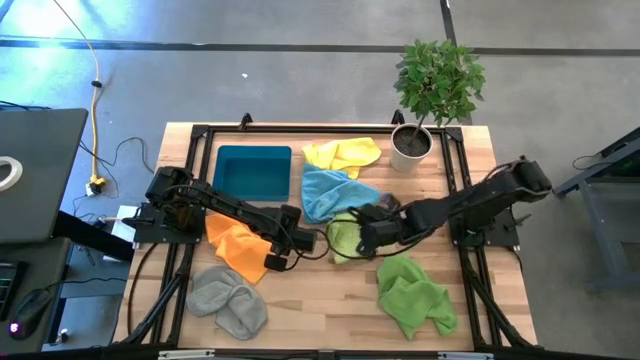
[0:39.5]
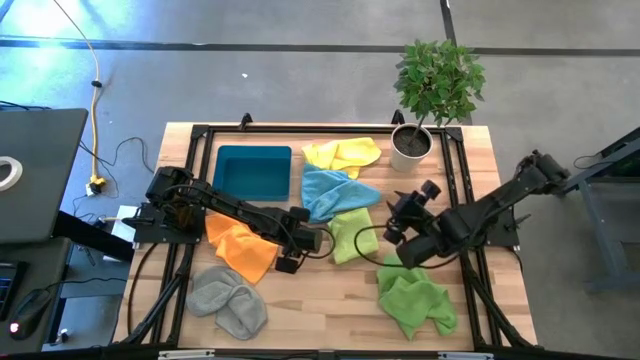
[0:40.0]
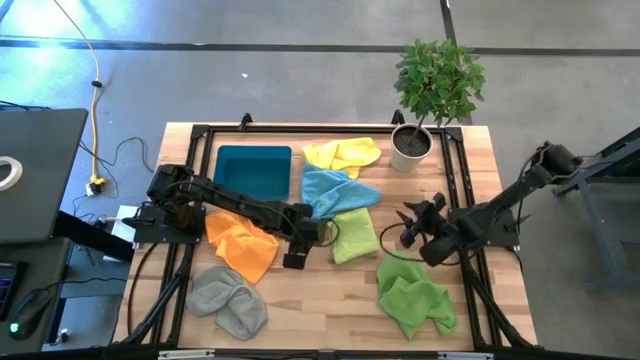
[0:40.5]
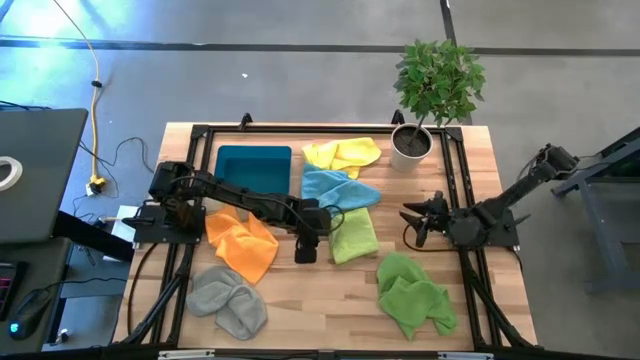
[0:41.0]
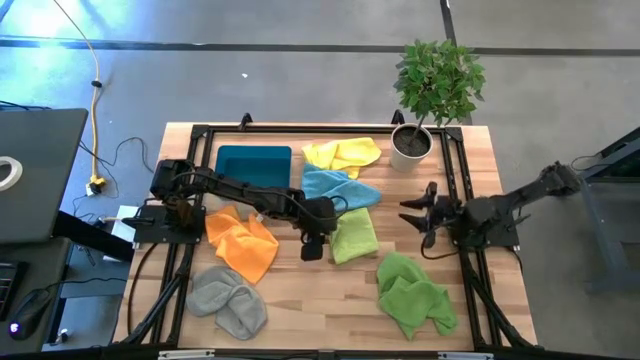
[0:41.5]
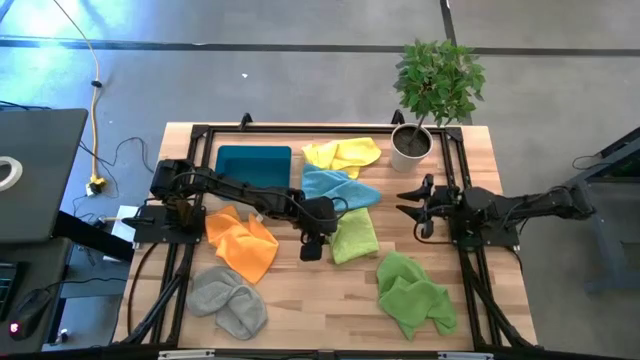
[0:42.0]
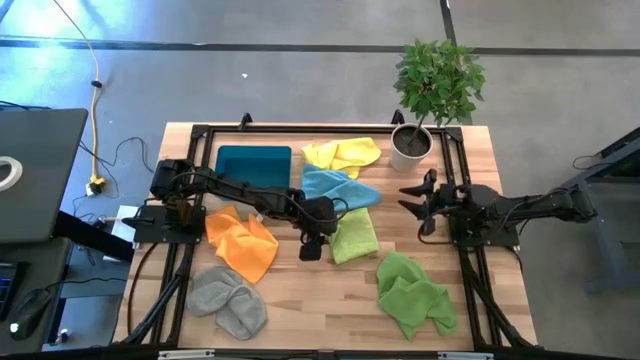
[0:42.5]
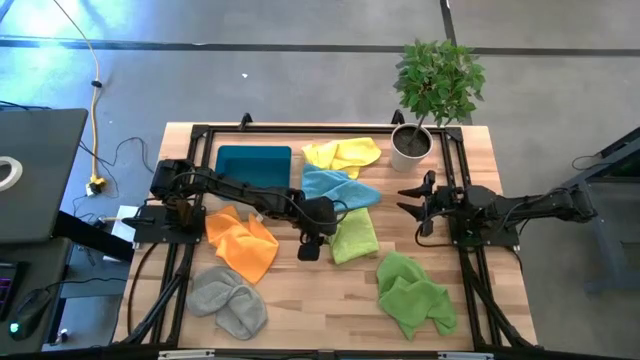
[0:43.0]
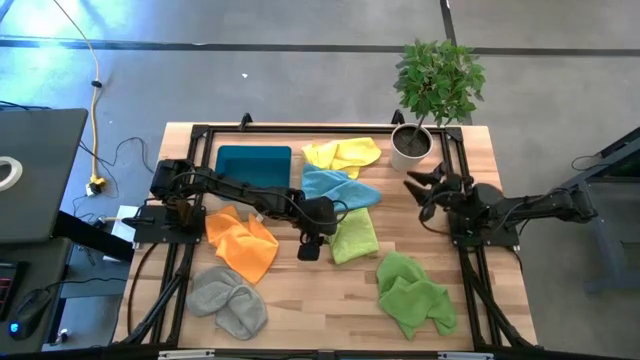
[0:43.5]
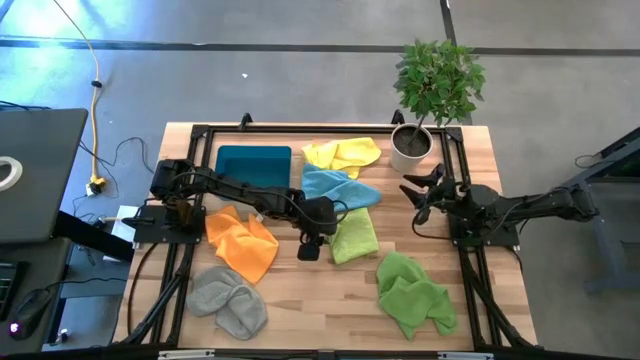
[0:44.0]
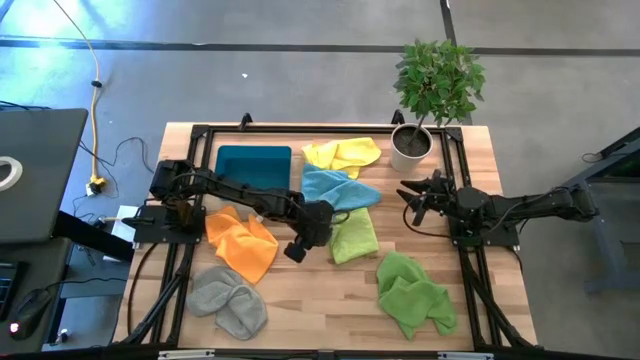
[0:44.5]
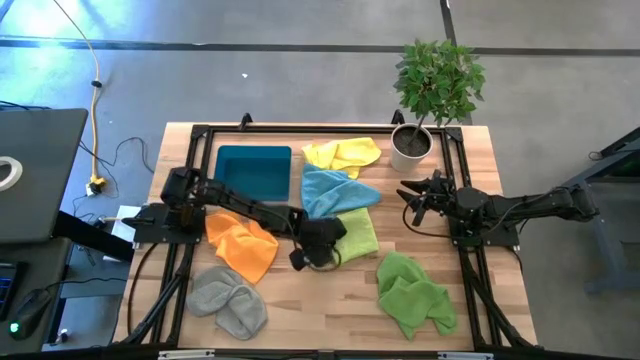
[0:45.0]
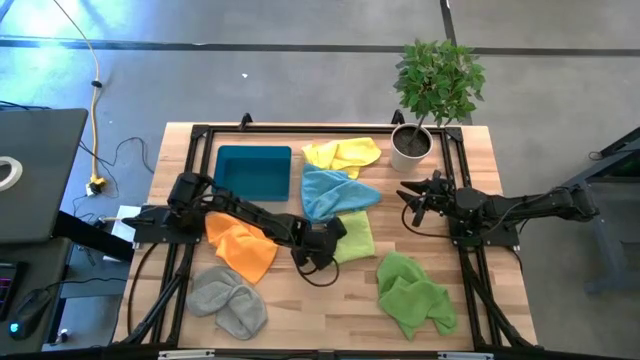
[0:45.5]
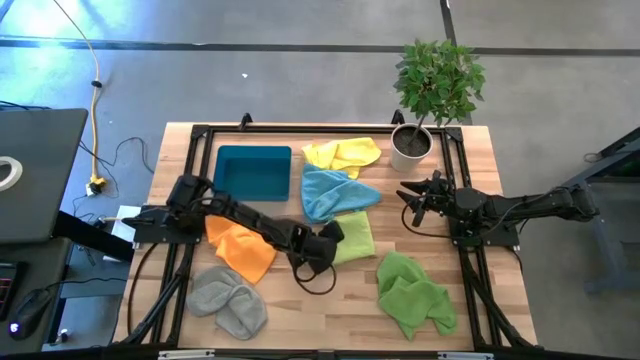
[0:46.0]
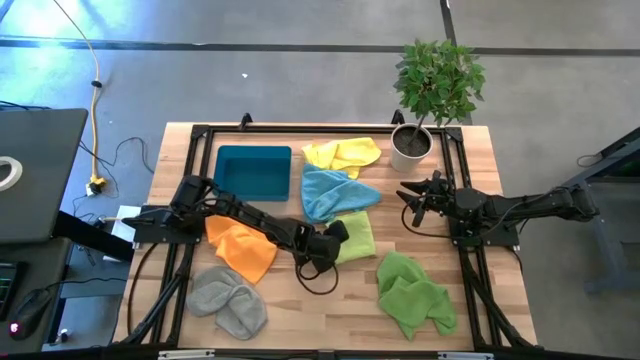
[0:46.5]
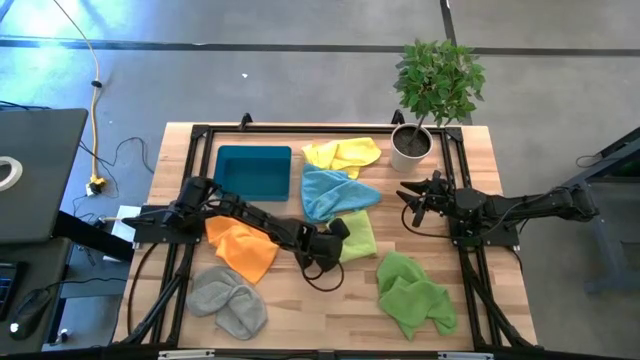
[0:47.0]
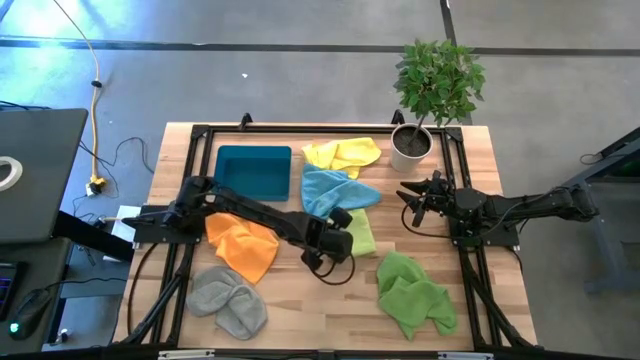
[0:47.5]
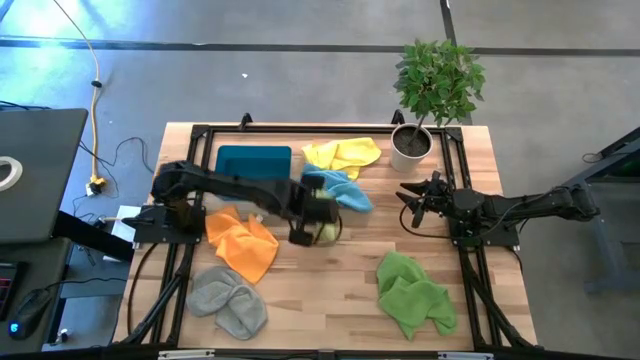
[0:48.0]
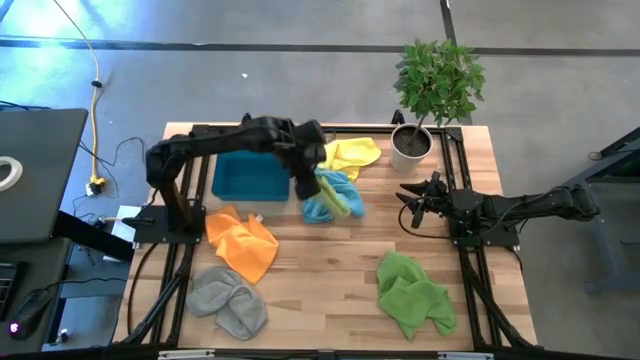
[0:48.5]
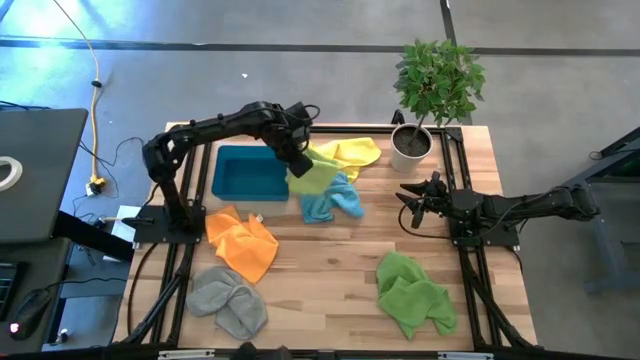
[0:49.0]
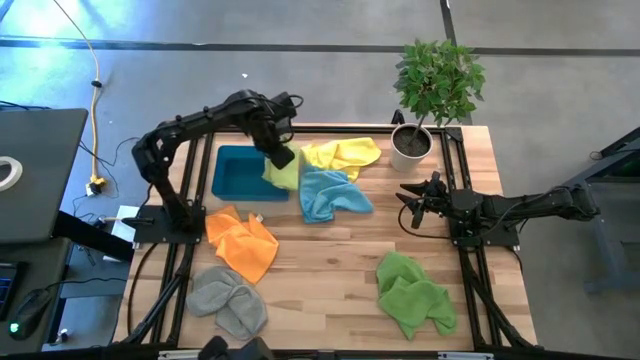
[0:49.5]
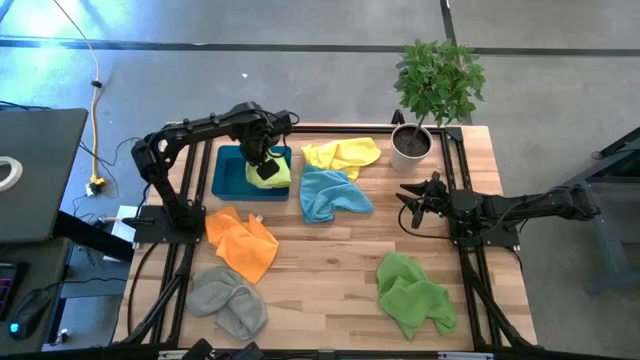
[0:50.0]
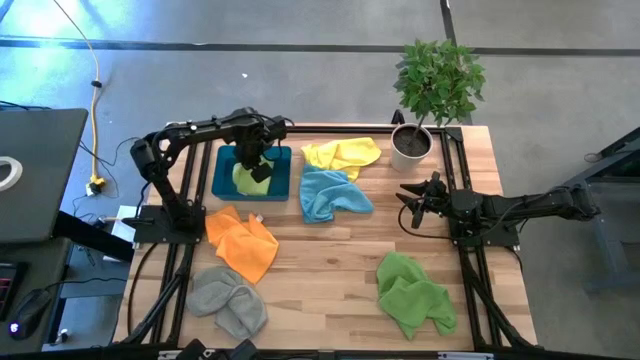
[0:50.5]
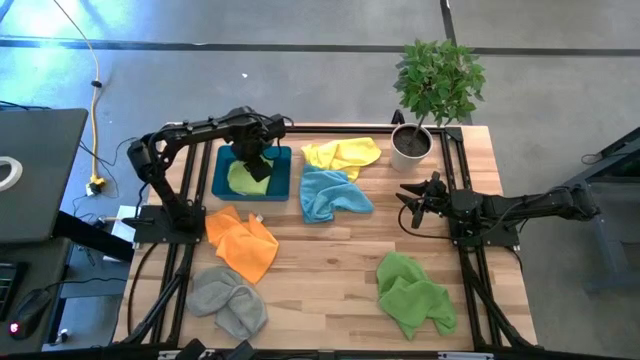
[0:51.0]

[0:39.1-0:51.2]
Task: Fold microfiber towels
Put the folded light green microfiber cloth into the blue bin

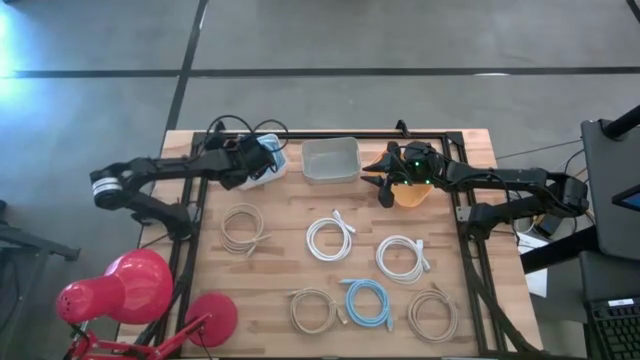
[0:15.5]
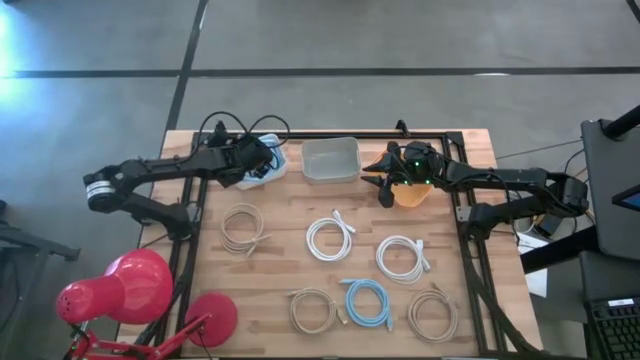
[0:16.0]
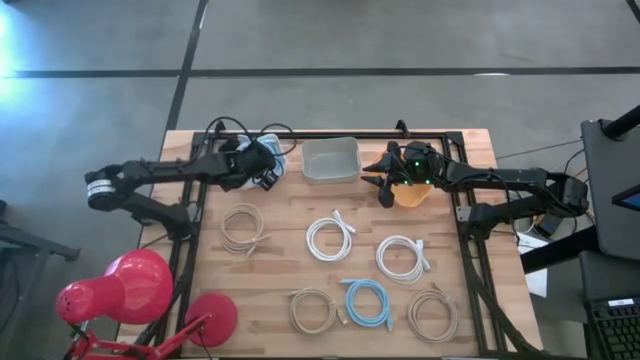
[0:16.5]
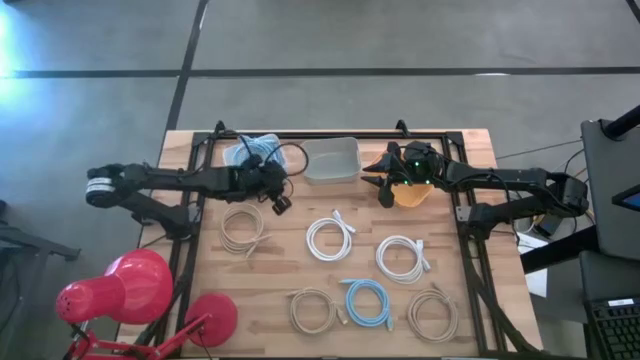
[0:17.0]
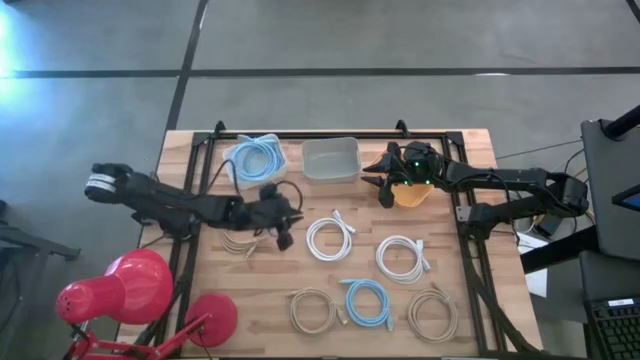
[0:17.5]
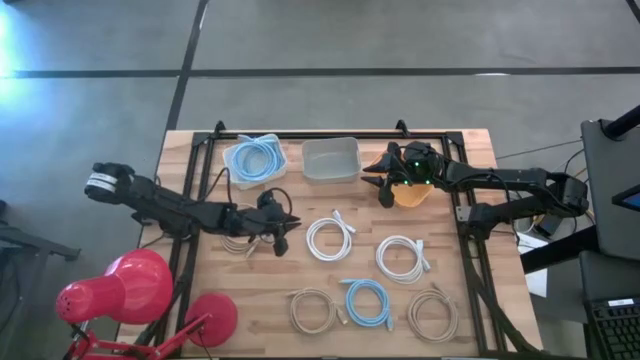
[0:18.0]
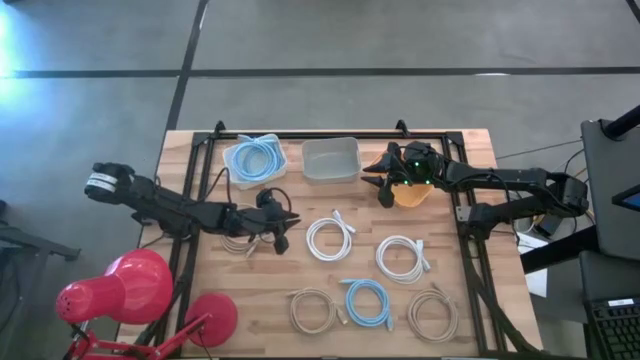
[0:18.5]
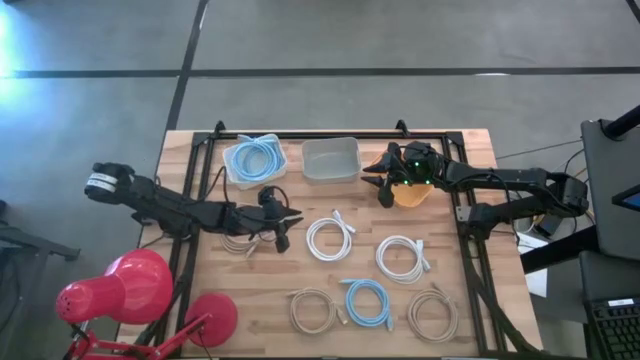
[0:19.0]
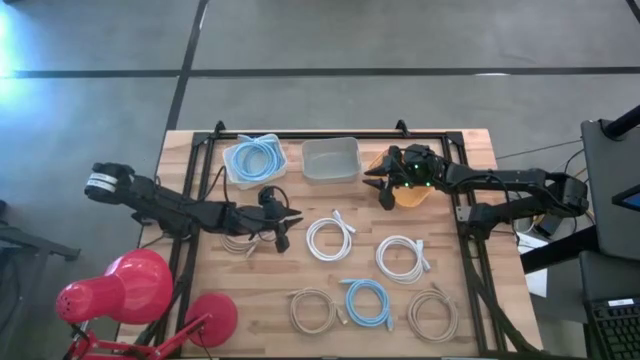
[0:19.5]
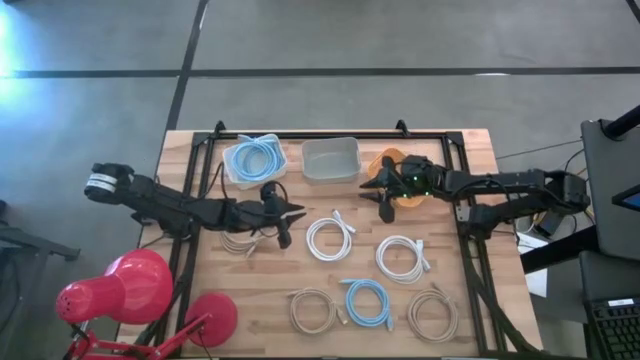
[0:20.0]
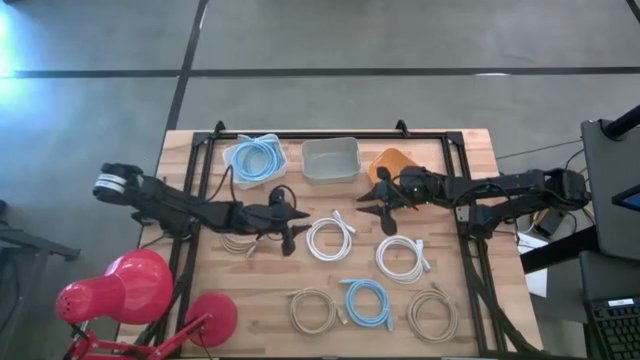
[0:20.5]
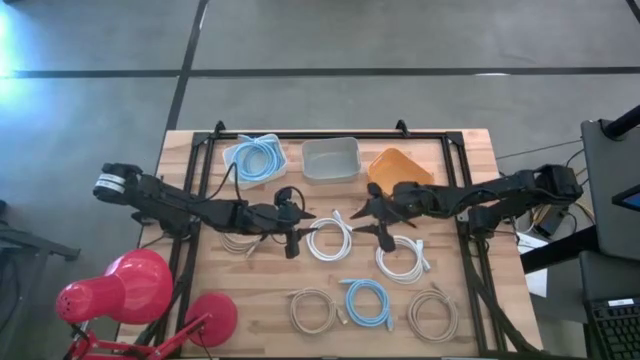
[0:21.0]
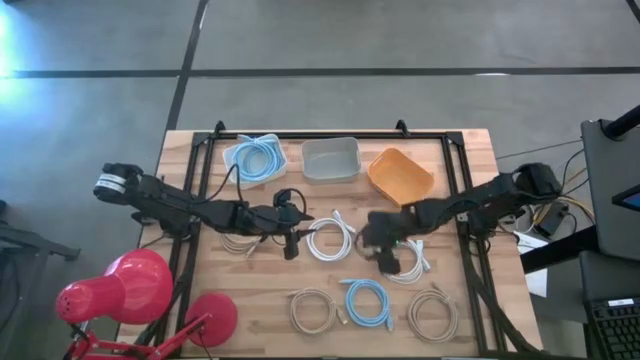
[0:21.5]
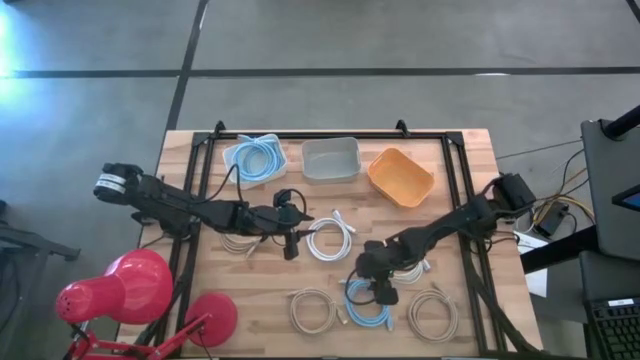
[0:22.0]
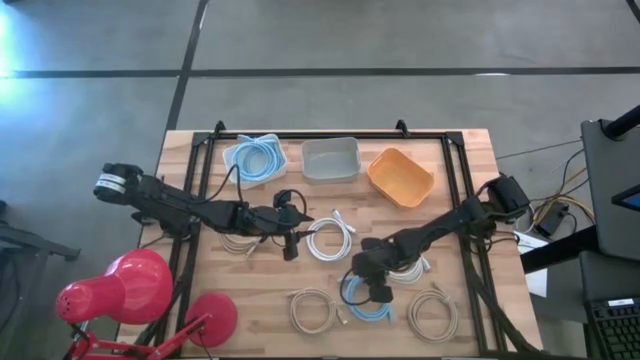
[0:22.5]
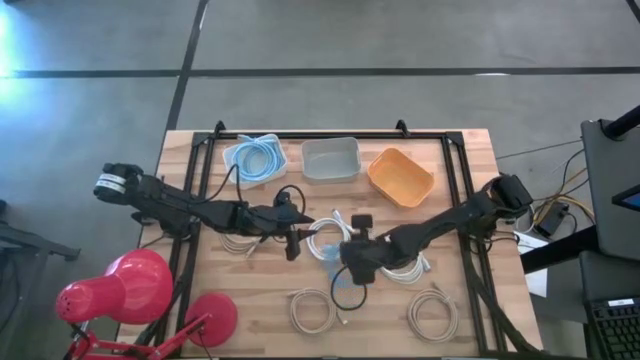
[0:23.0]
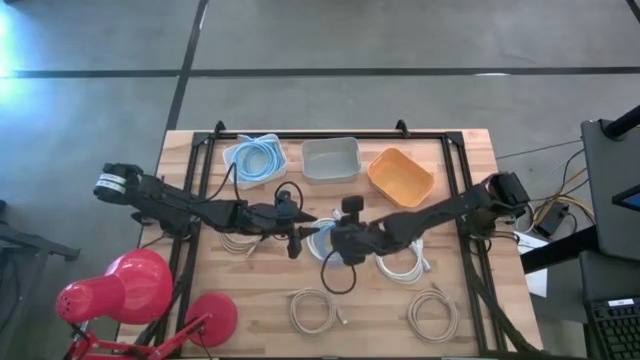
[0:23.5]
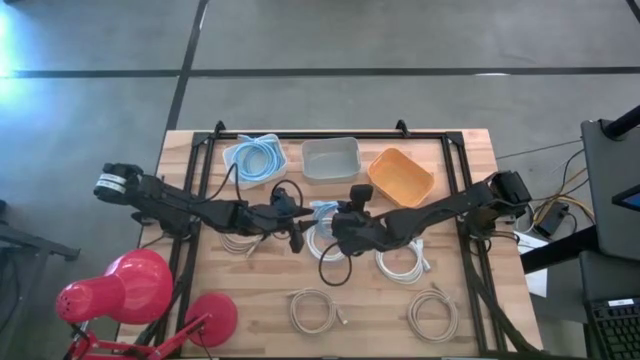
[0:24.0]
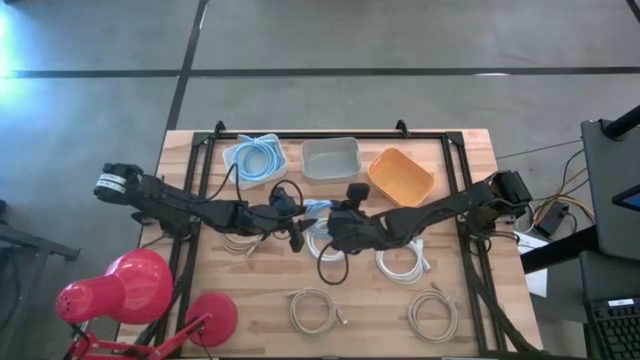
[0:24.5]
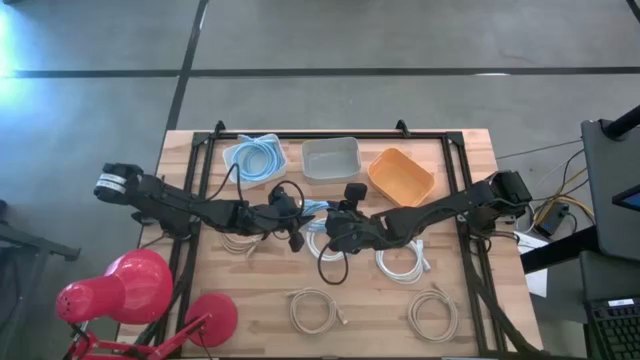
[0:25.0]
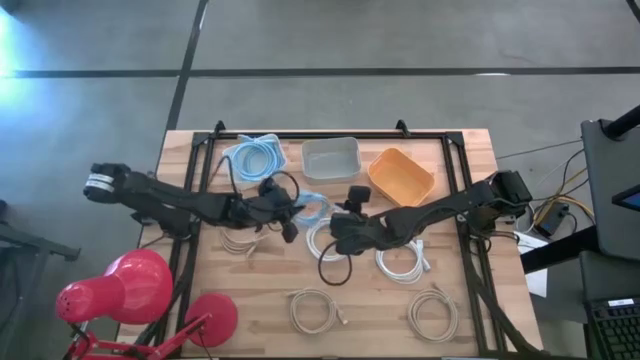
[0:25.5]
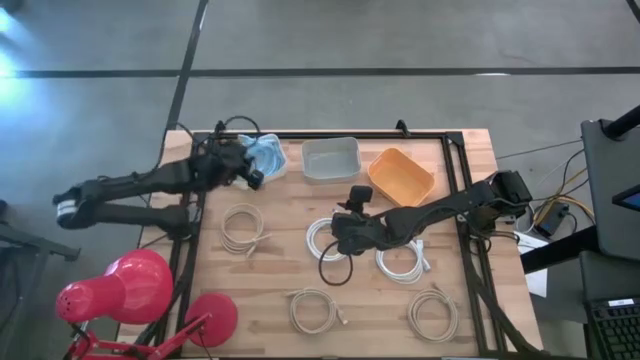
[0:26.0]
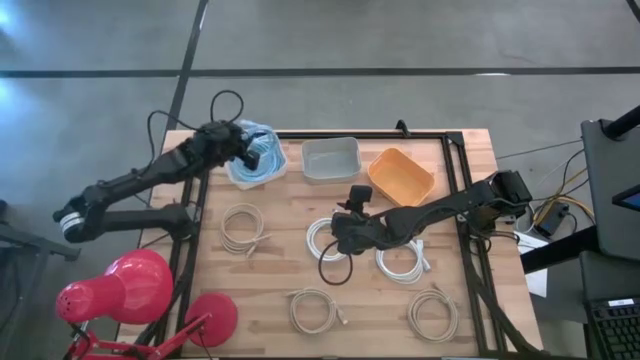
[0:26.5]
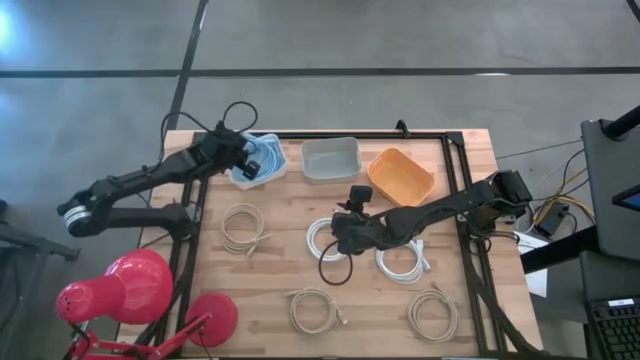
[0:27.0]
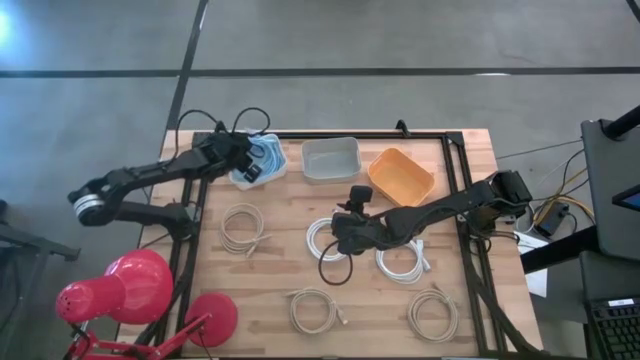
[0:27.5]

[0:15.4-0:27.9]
Task: Pick & Place USB Port
Put the blue cable into the white bin
